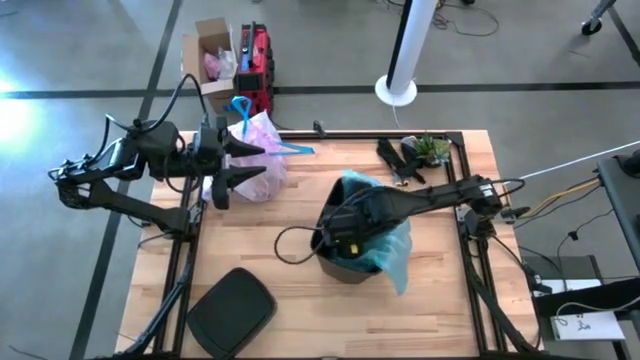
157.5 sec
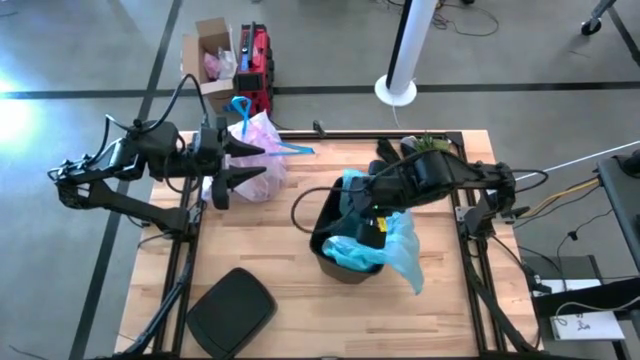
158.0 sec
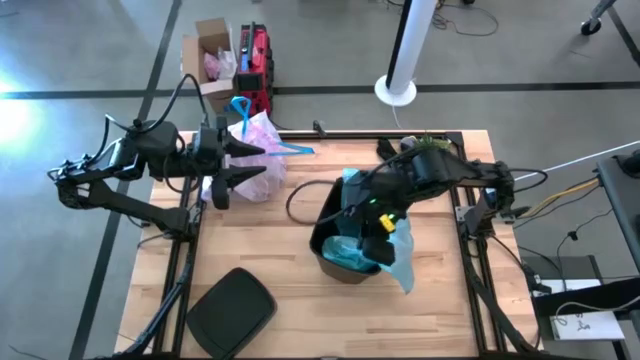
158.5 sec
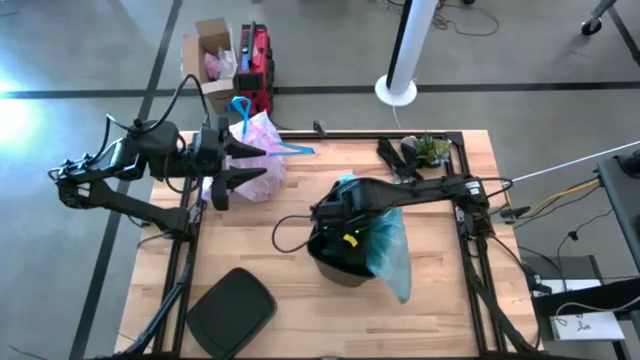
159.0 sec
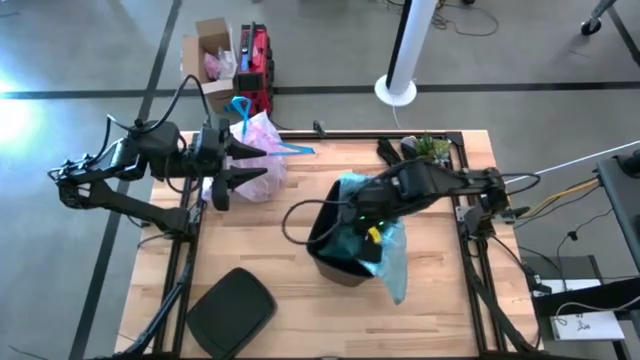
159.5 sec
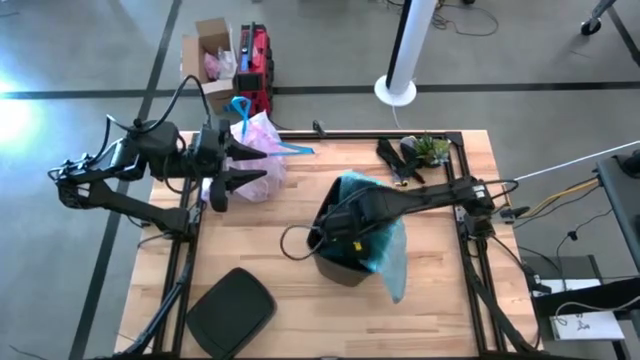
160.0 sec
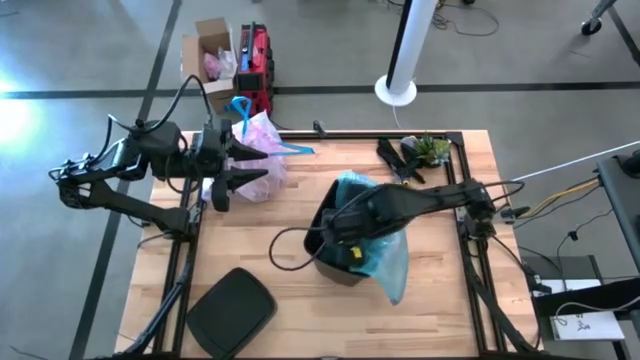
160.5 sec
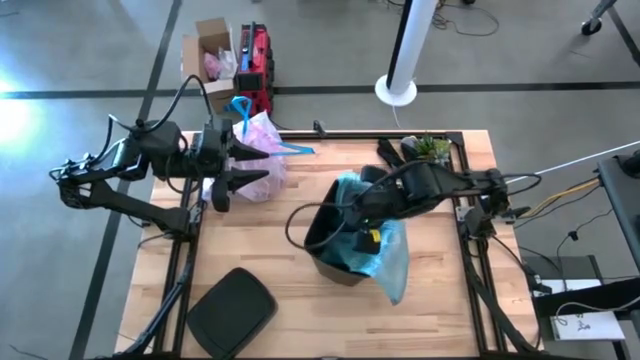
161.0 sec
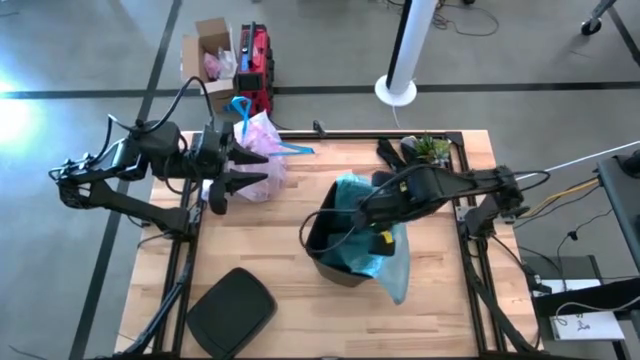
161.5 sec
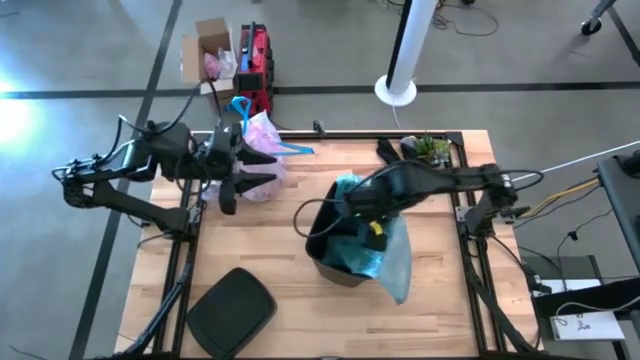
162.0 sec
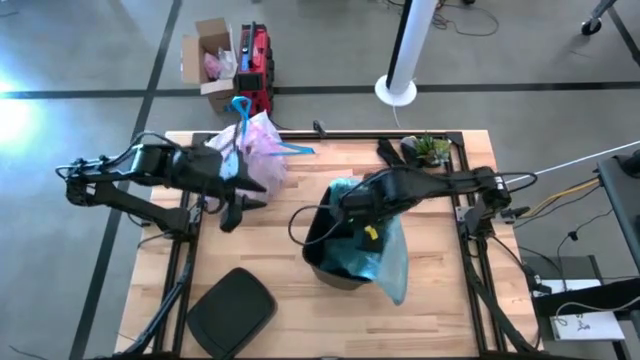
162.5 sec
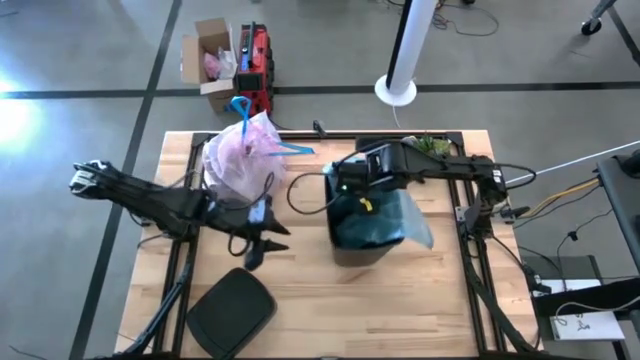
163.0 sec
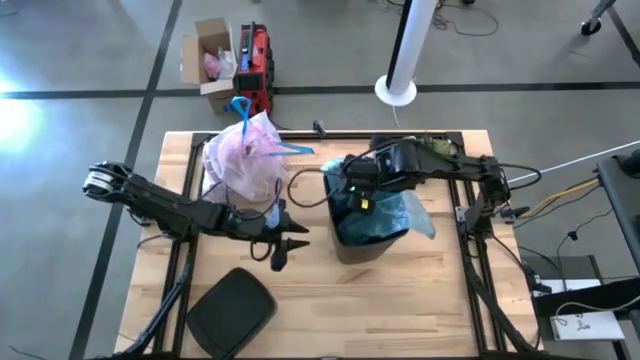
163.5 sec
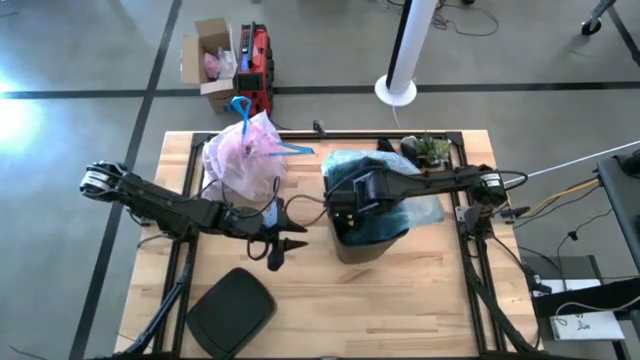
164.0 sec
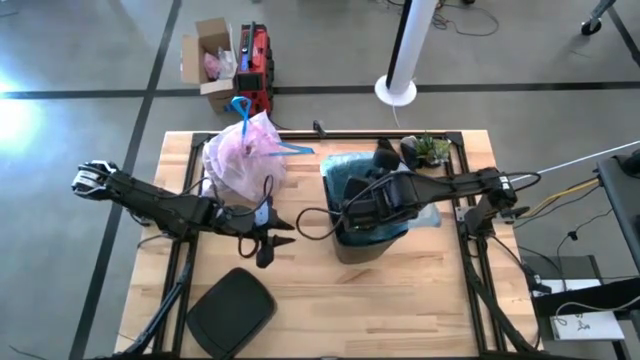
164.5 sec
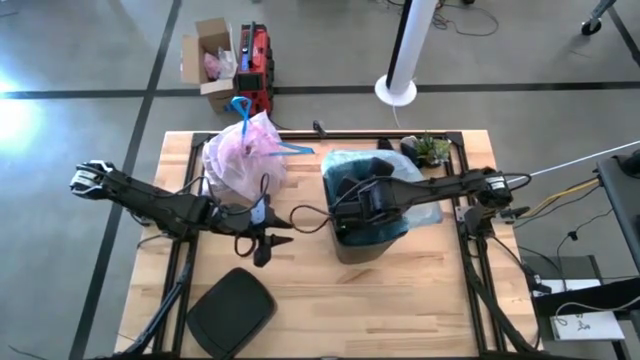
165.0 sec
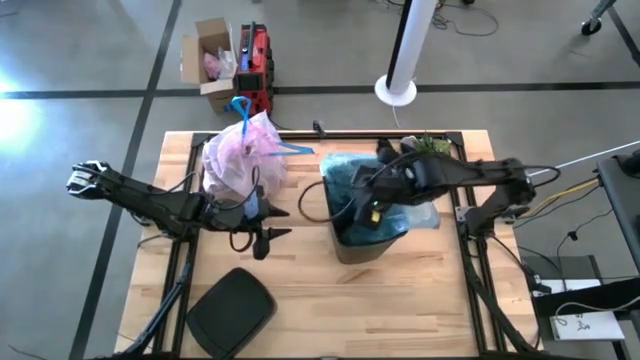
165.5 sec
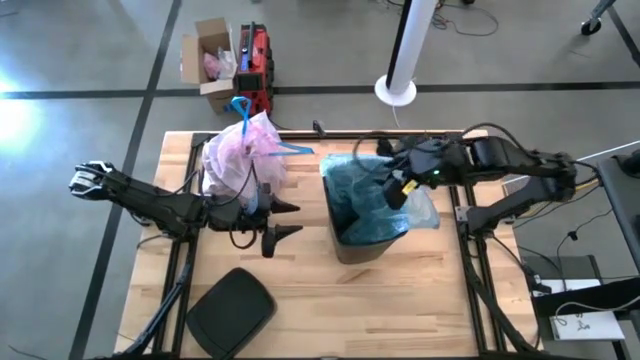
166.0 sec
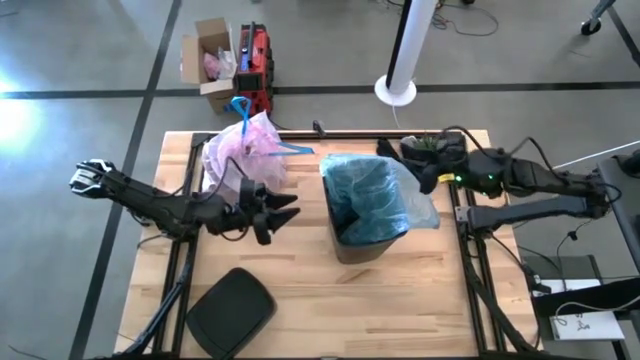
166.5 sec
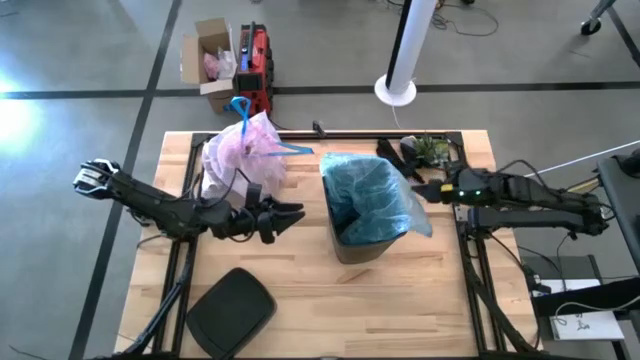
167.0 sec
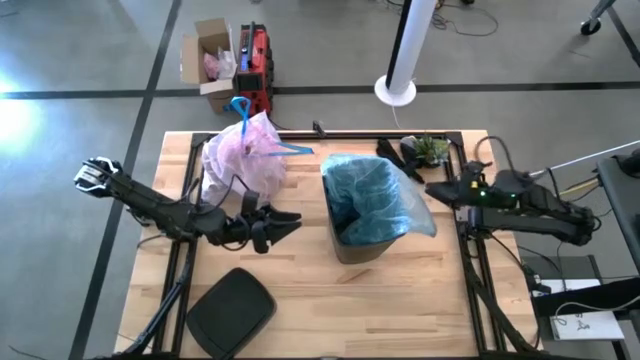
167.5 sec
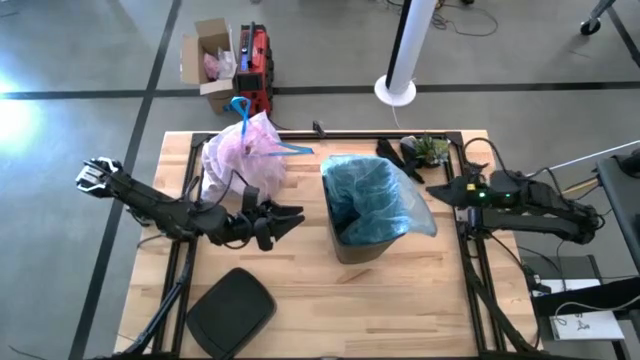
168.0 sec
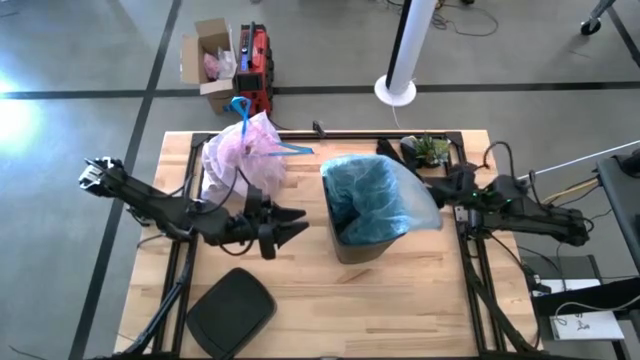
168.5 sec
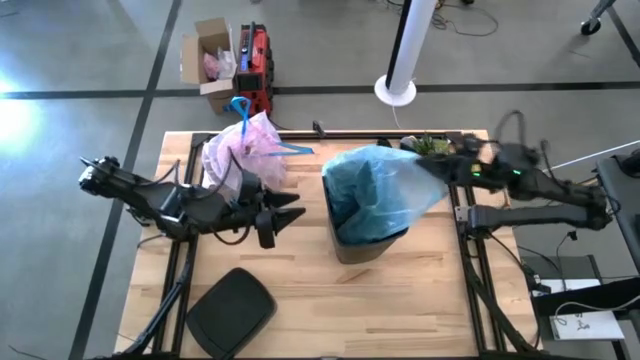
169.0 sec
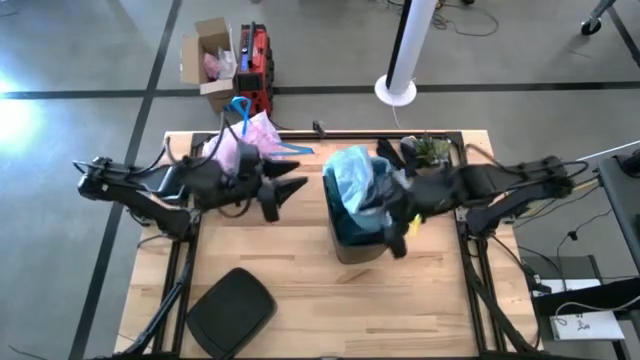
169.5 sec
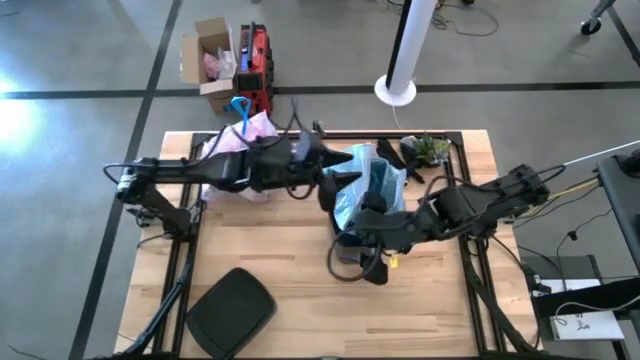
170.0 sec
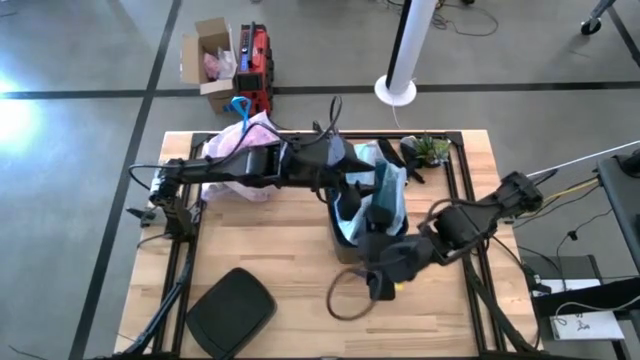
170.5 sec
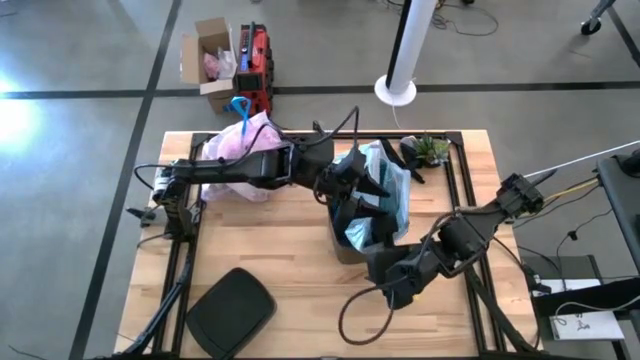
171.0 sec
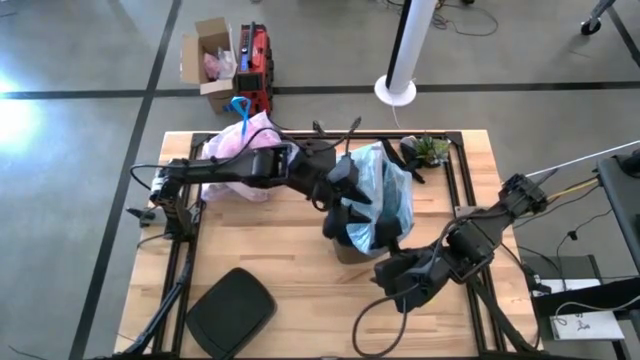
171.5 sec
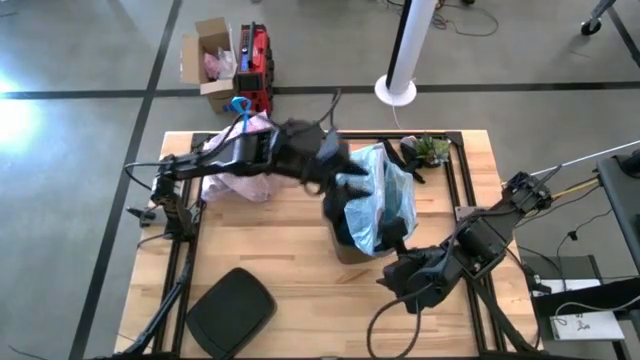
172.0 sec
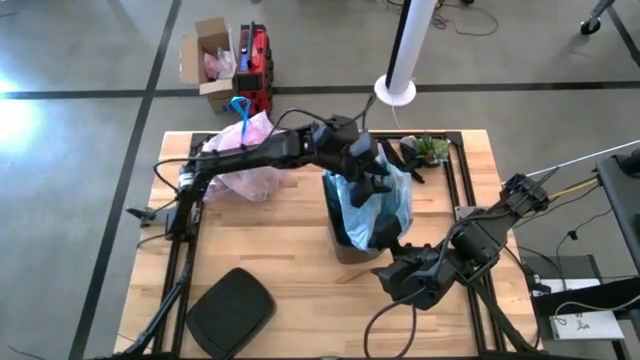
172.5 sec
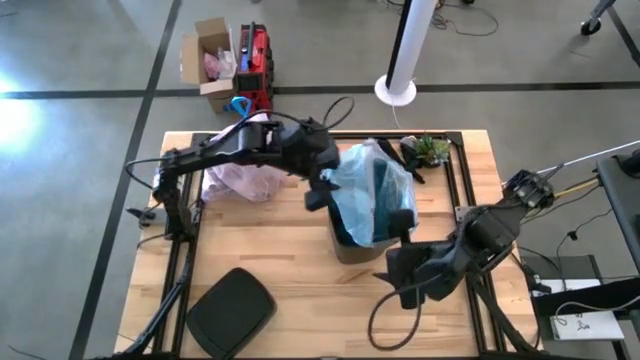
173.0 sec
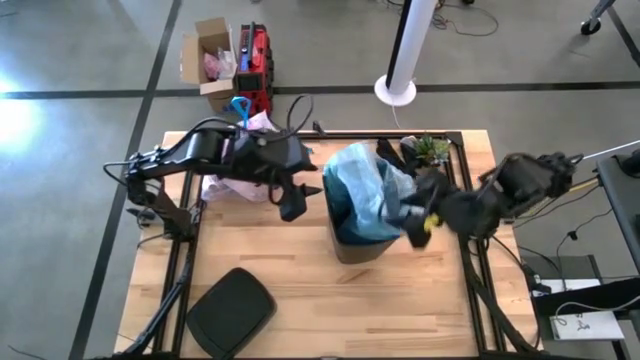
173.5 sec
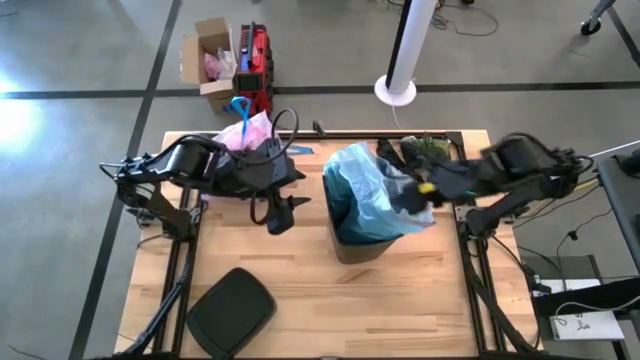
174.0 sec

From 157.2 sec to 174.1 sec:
Task: place trash/remove bag and relplace
Insert the blue trash bag into the trash bin

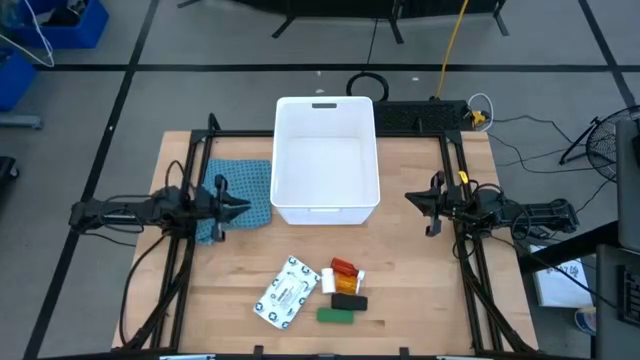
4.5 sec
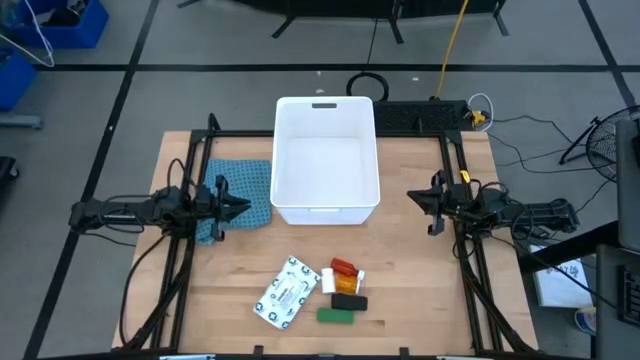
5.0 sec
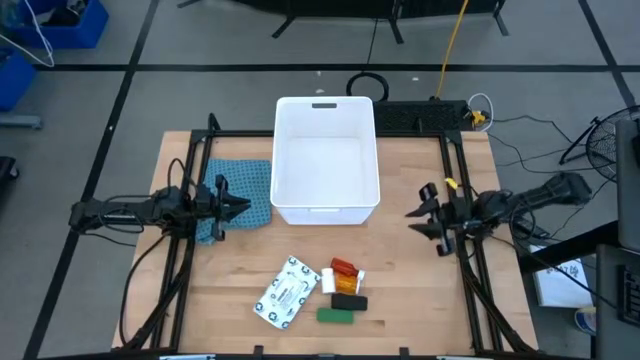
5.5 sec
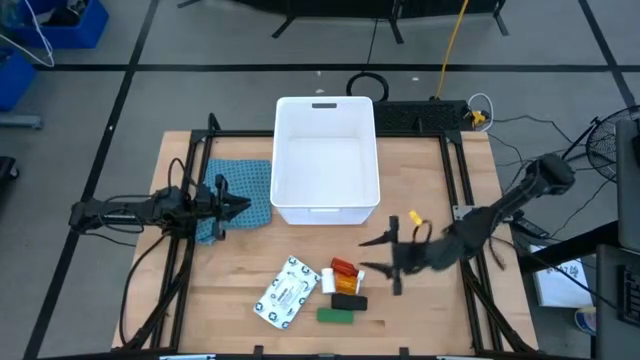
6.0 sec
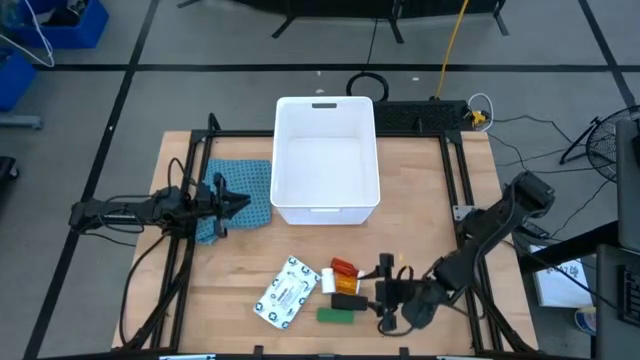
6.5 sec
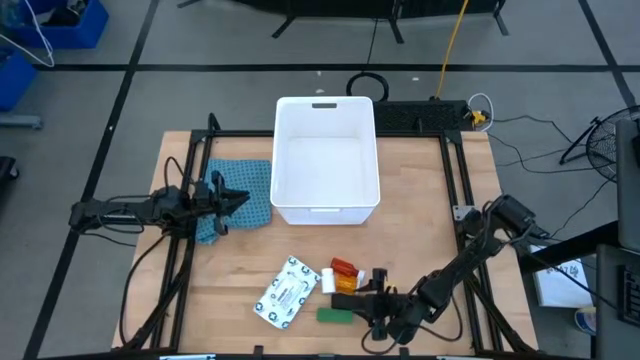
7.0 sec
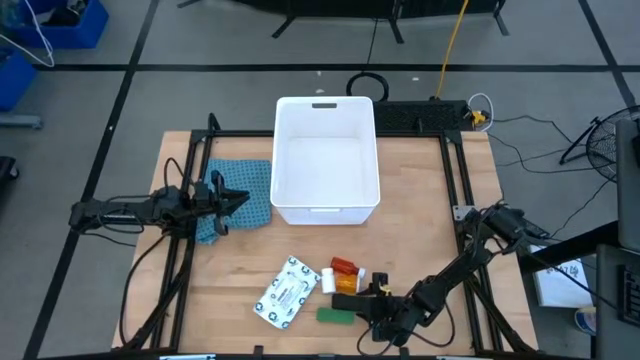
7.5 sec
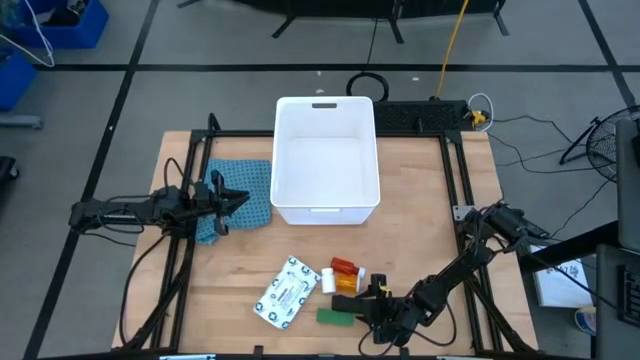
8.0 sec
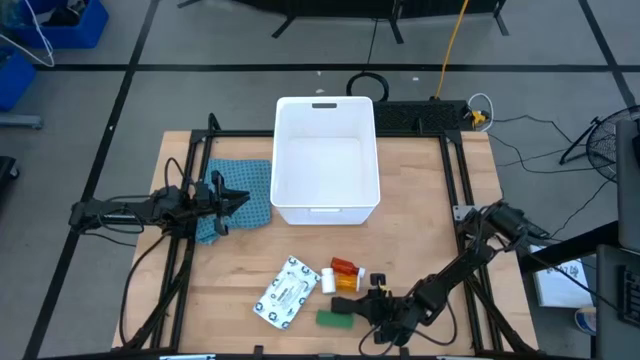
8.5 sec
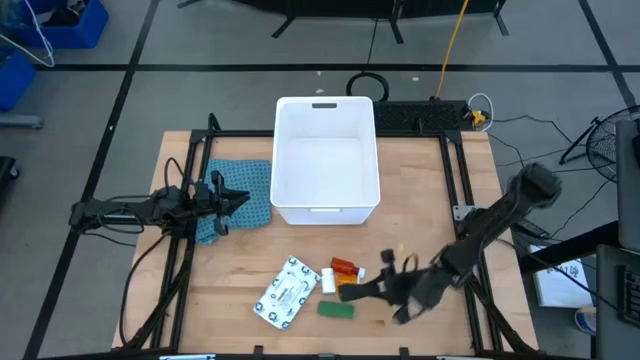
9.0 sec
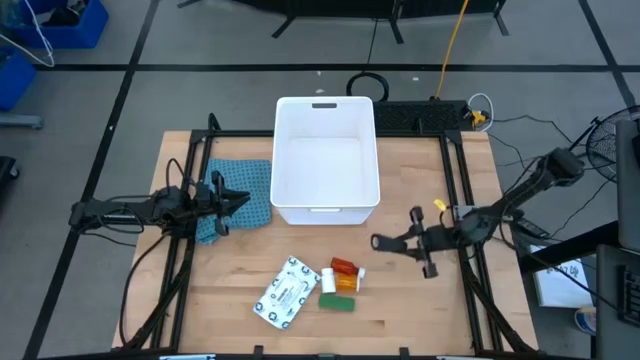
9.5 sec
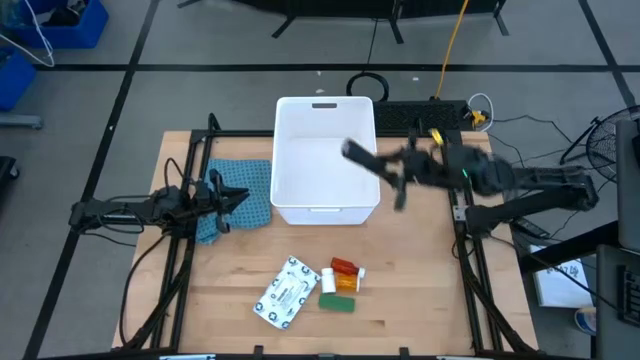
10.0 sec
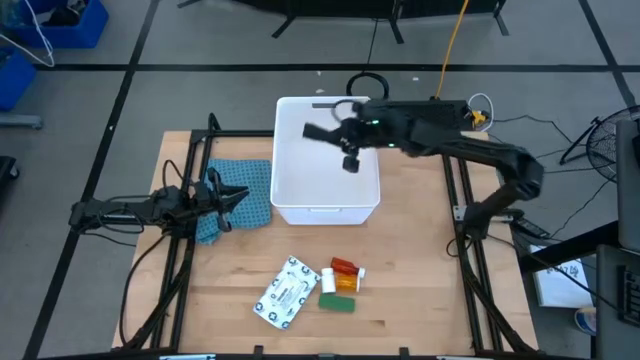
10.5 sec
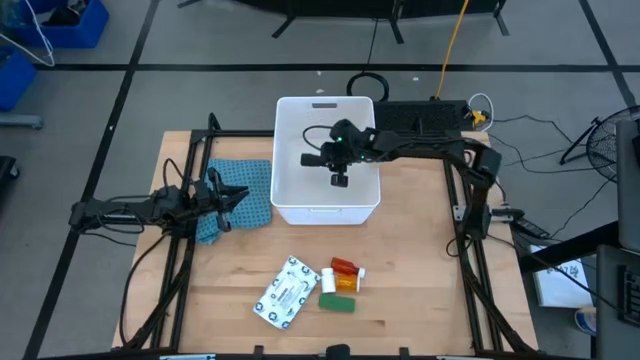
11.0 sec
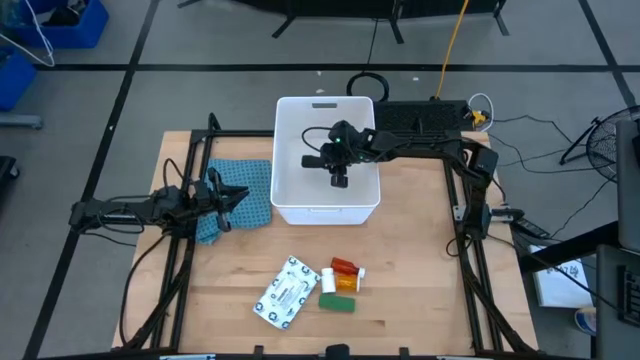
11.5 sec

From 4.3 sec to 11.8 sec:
Task: Pick & place medical supplies in basket/bin
Put the rolled black bandage into the white container
